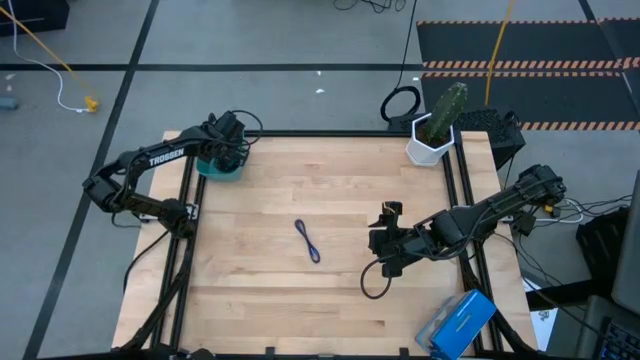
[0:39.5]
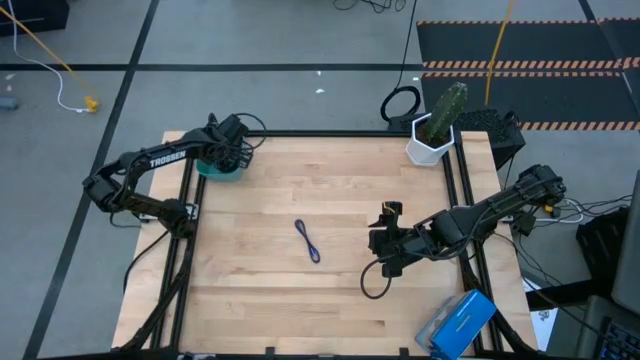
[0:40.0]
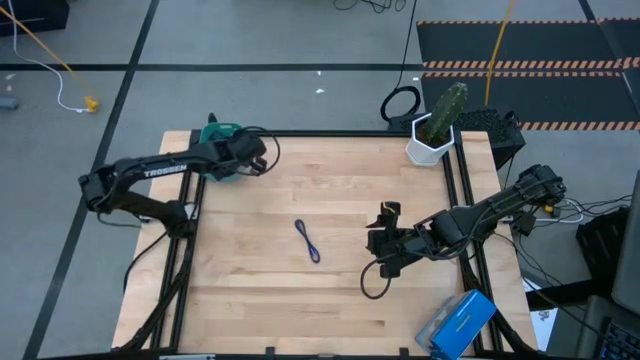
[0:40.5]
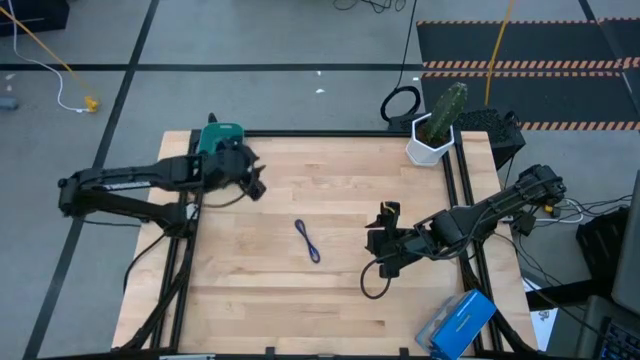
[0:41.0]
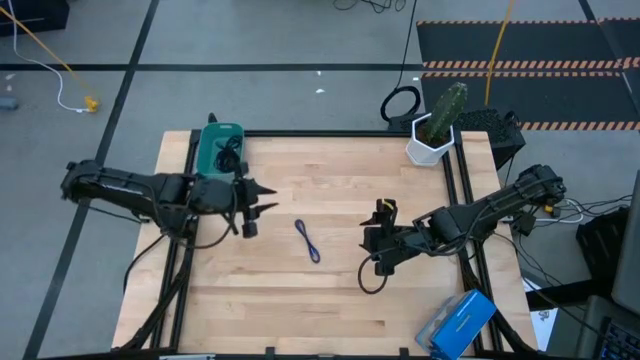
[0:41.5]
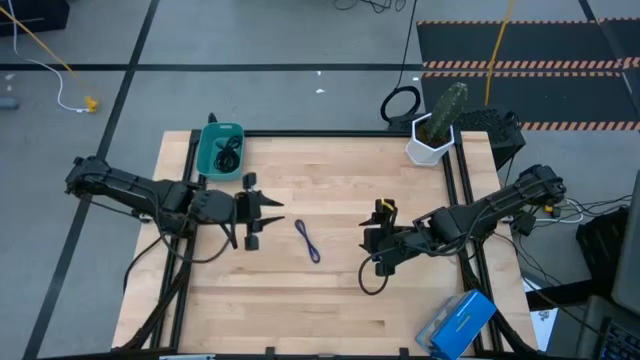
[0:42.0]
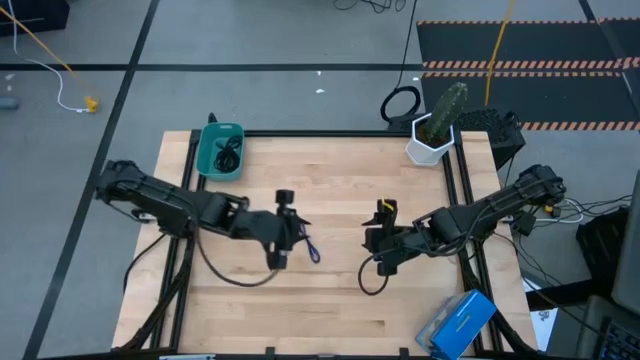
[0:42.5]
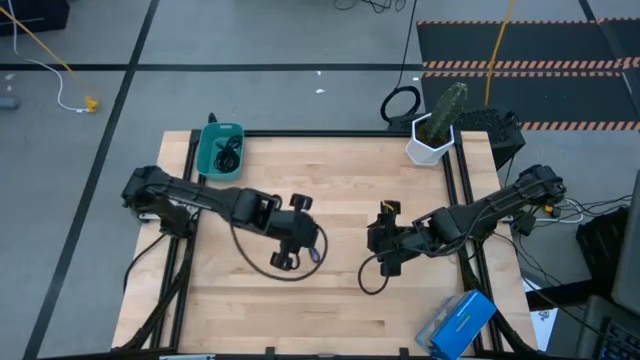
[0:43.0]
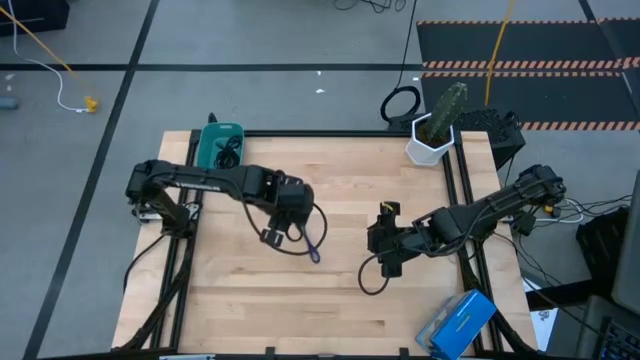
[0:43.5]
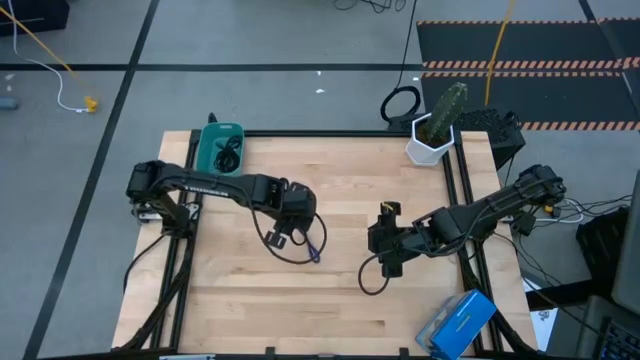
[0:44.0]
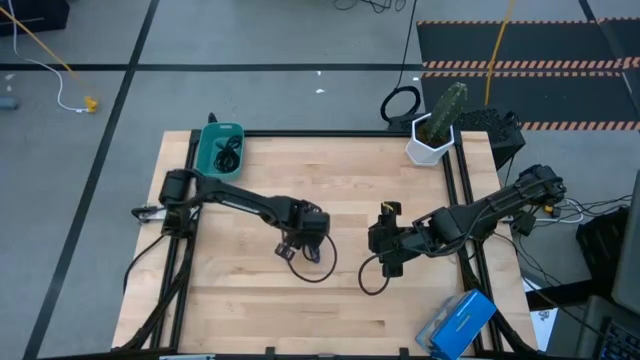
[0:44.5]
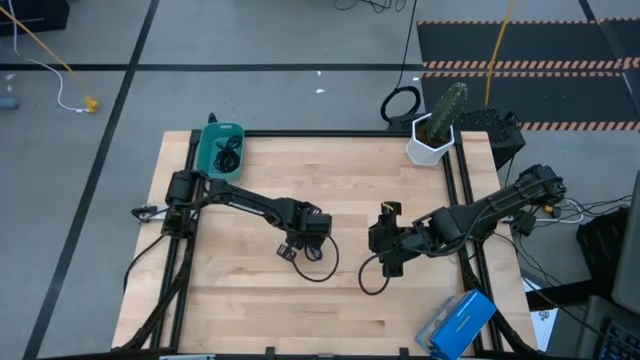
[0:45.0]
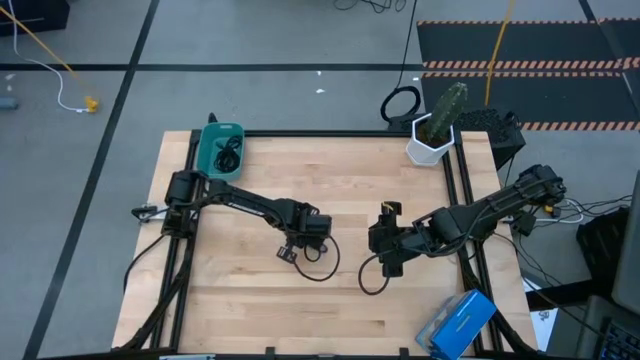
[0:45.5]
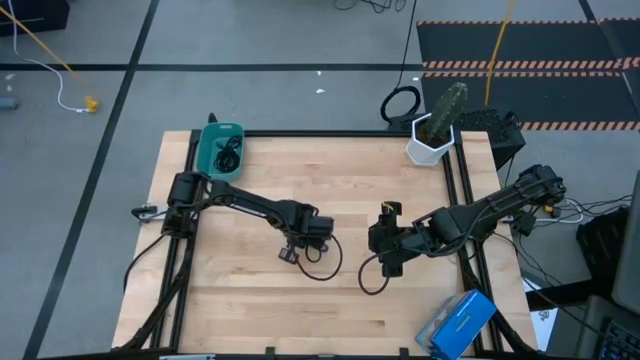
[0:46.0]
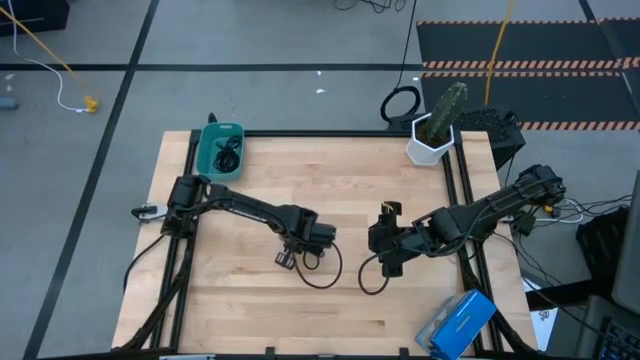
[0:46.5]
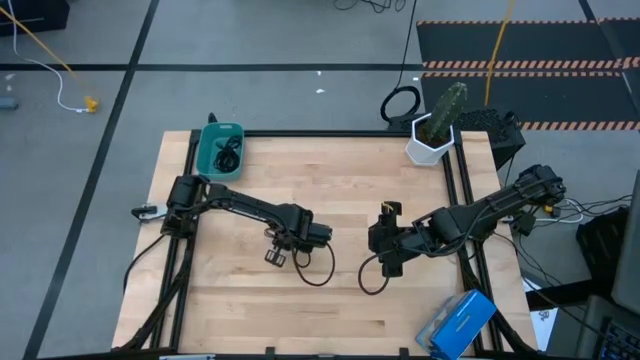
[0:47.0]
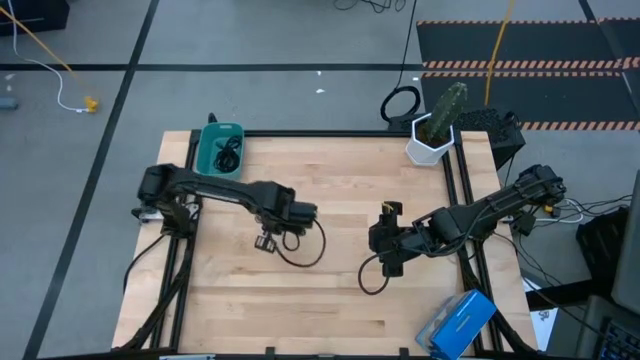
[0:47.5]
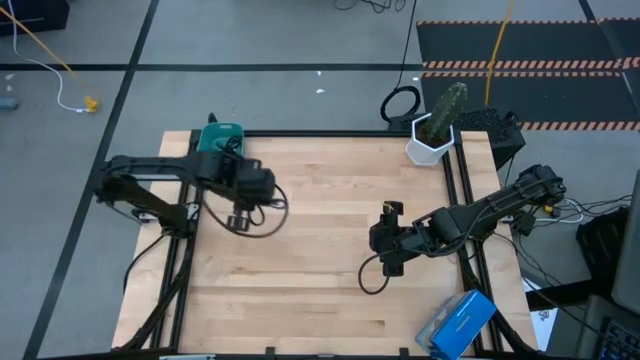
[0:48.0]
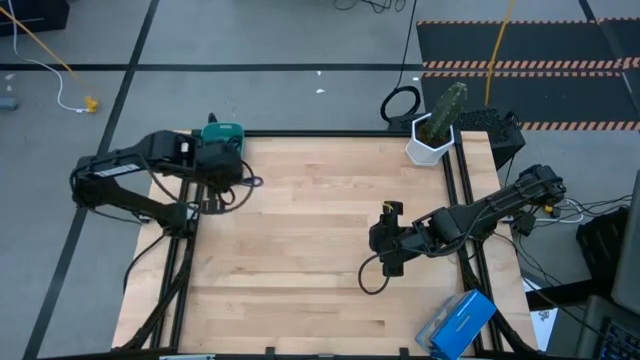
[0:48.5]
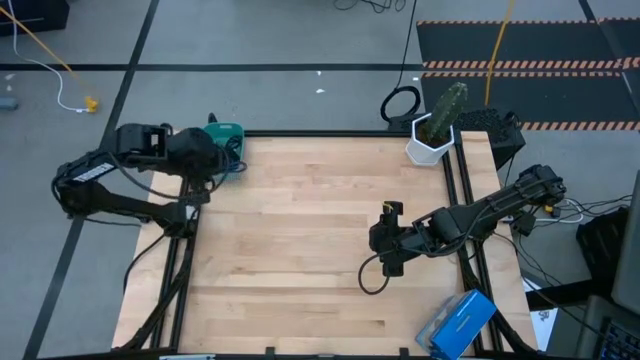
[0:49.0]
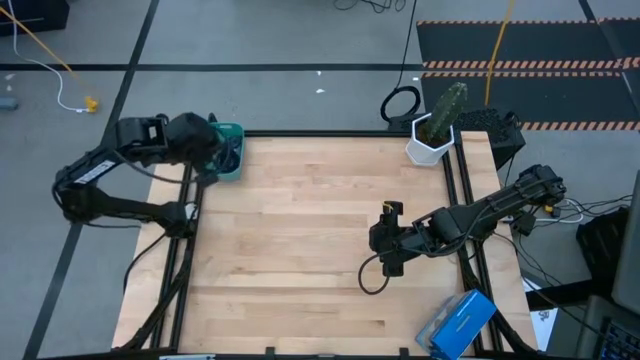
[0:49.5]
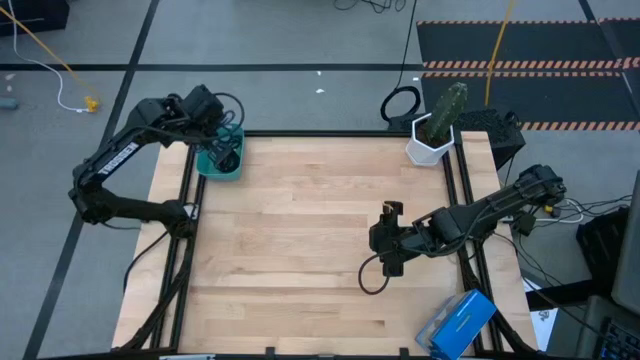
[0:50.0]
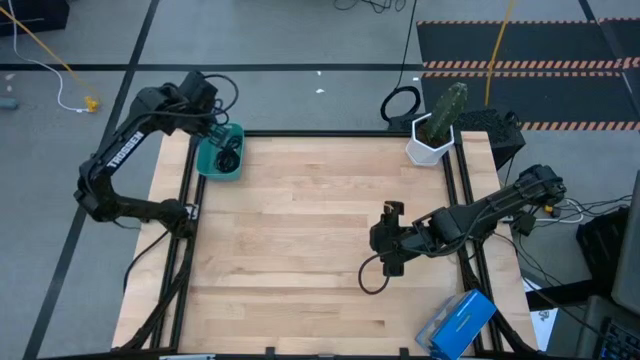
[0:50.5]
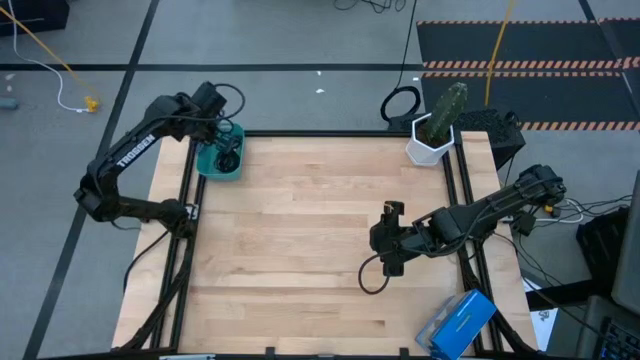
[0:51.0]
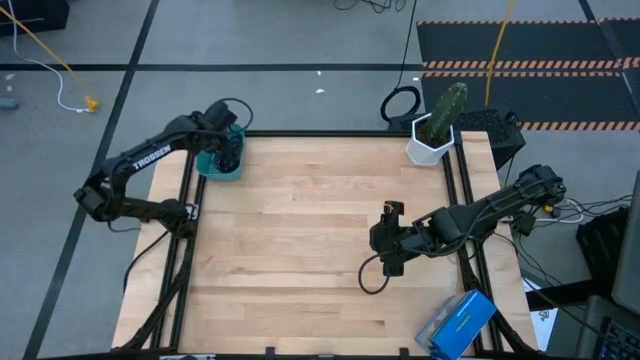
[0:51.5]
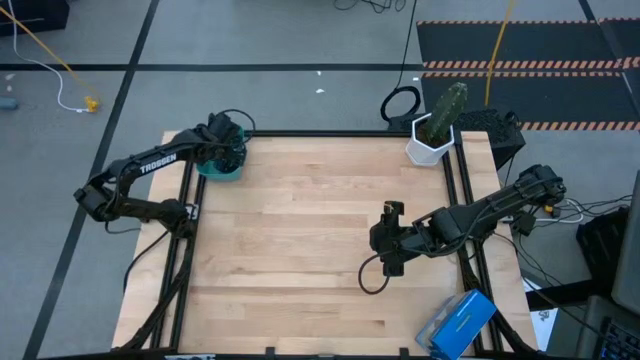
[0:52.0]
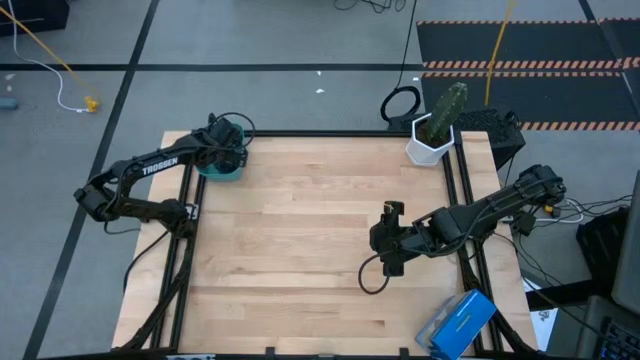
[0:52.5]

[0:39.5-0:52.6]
Task: Pick and place USB-C Cables
Put the blue USB cable into the blue bin
